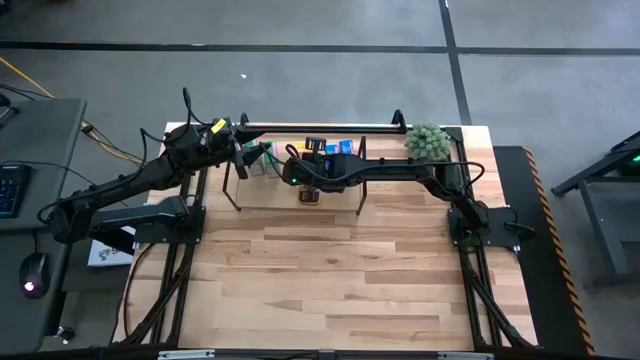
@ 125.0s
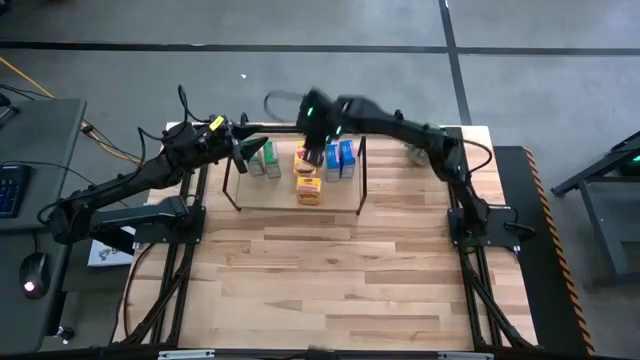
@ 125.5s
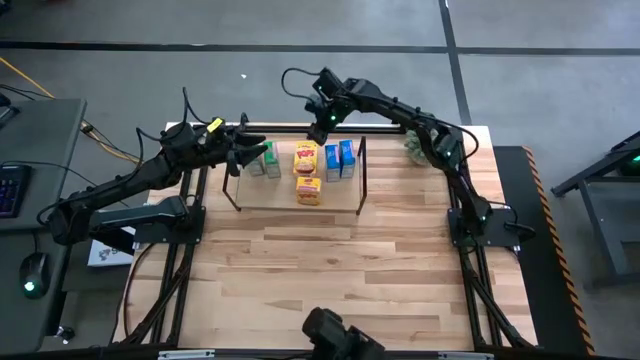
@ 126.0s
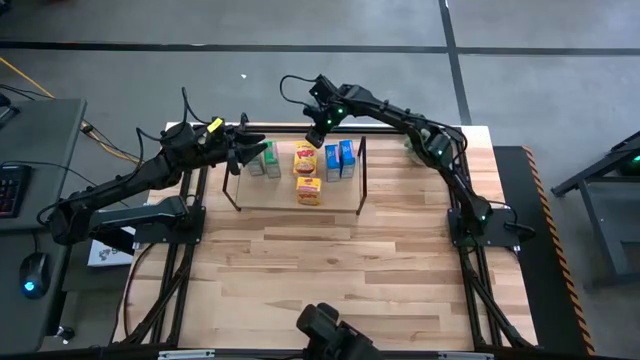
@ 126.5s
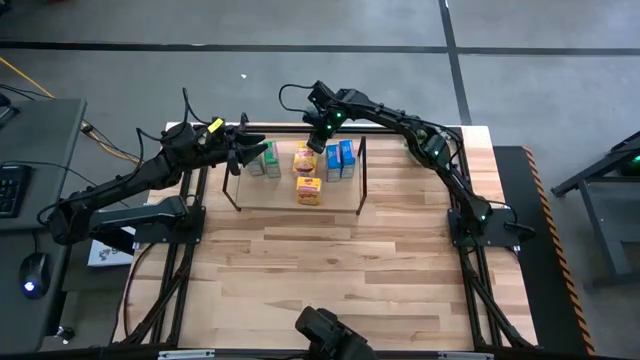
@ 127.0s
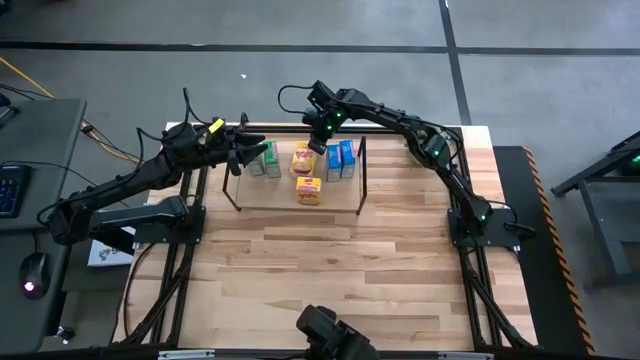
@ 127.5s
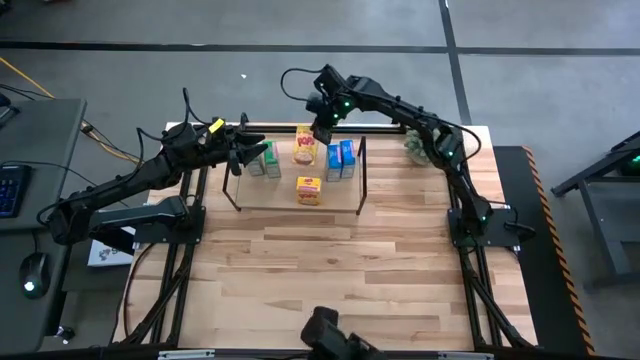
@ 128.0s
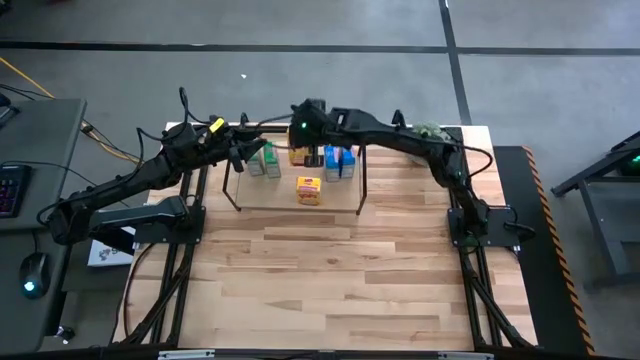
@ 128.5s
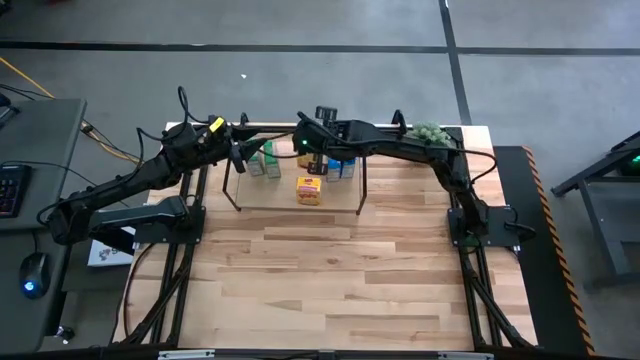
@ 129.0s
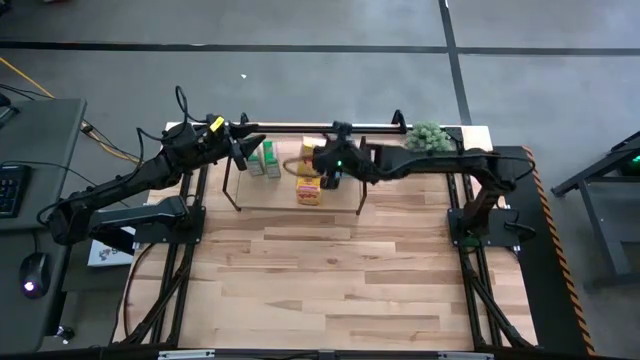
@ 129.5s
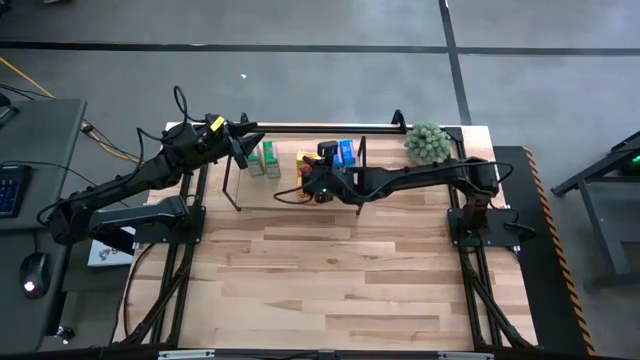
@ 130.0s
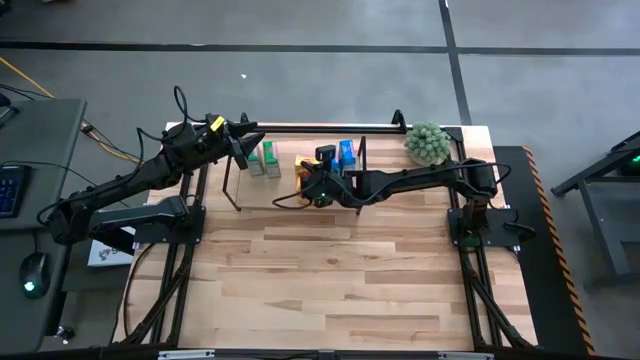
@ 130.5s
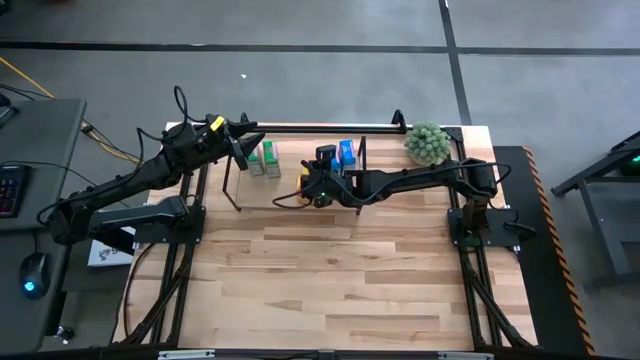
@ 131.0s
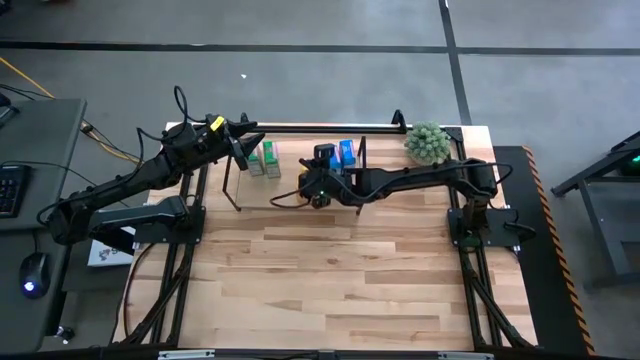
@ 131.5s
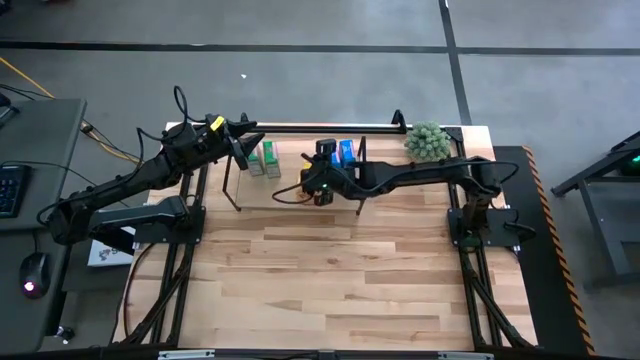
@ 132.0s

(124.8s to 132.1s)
Task: Stack cereal on shelf
Adjust the top yellow cereal box on the shelf

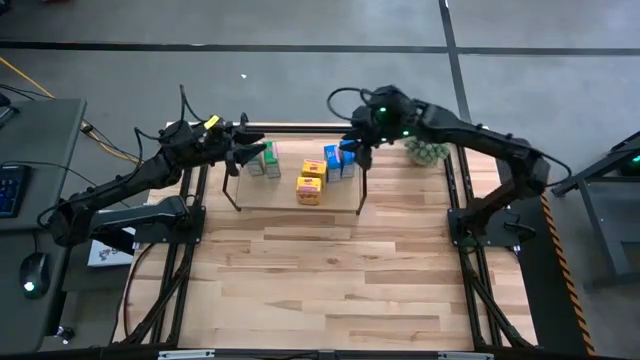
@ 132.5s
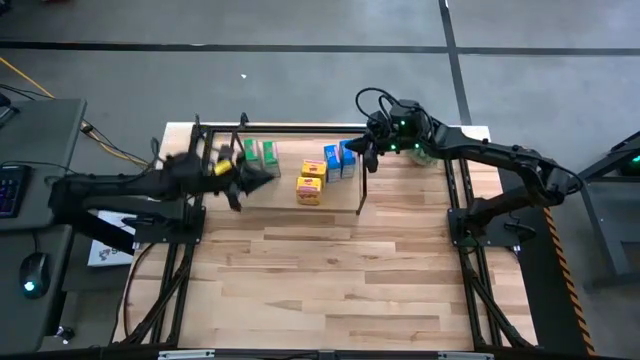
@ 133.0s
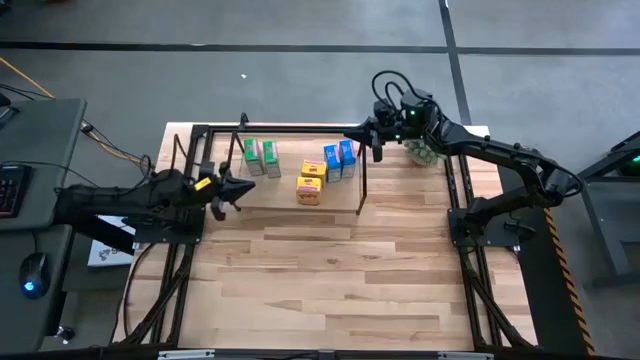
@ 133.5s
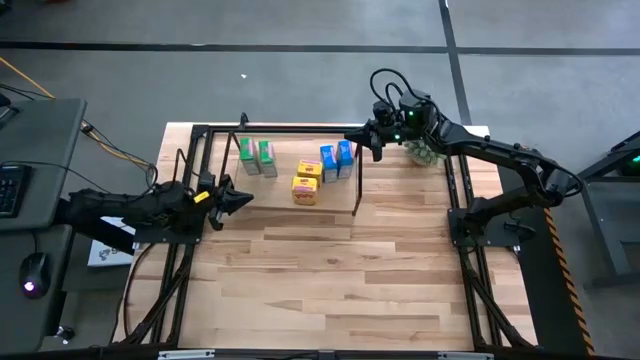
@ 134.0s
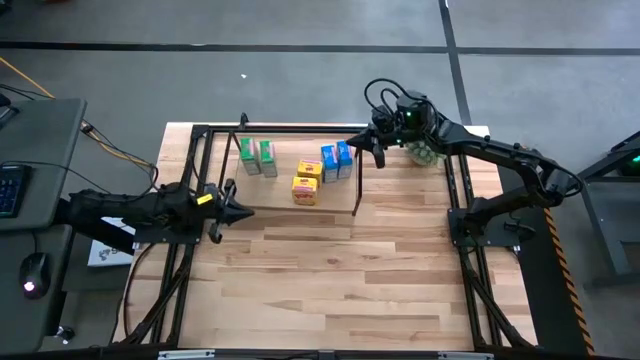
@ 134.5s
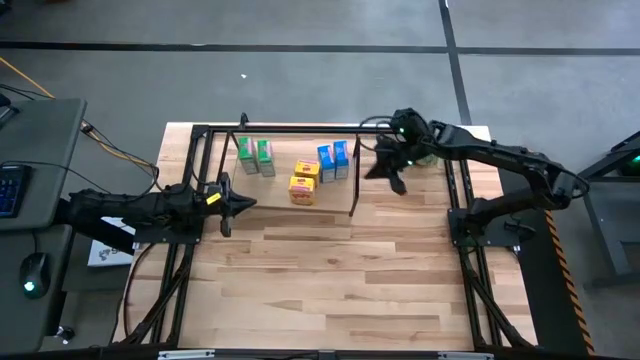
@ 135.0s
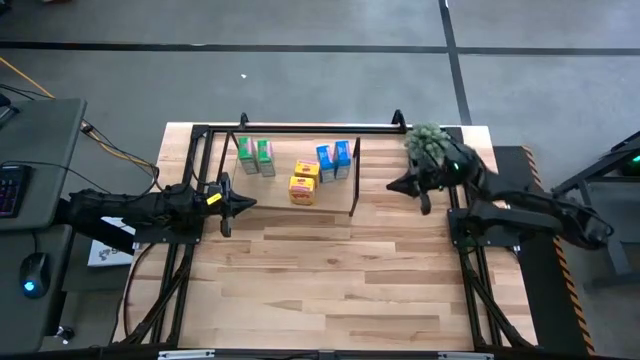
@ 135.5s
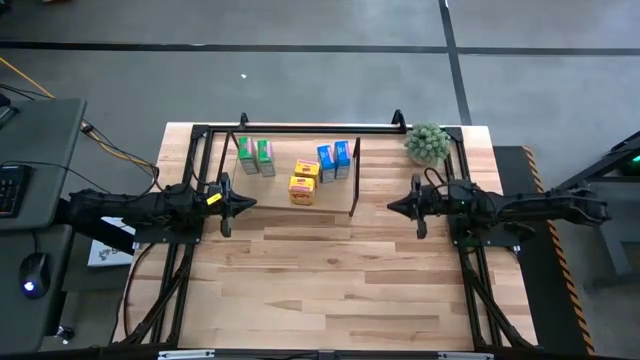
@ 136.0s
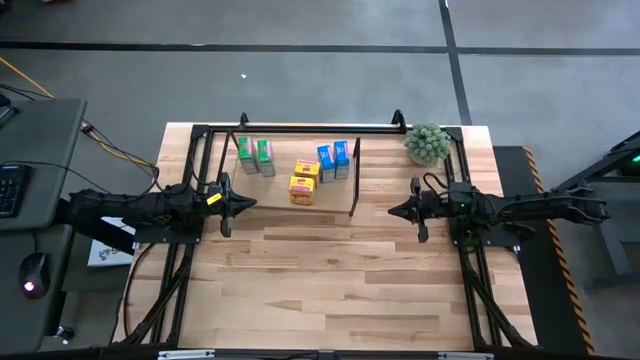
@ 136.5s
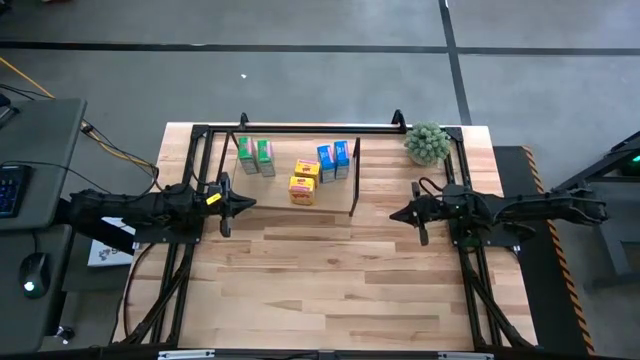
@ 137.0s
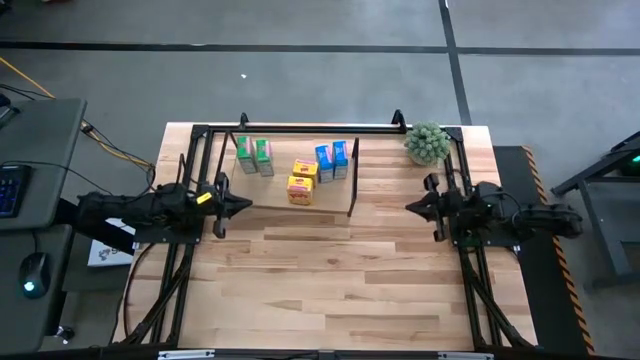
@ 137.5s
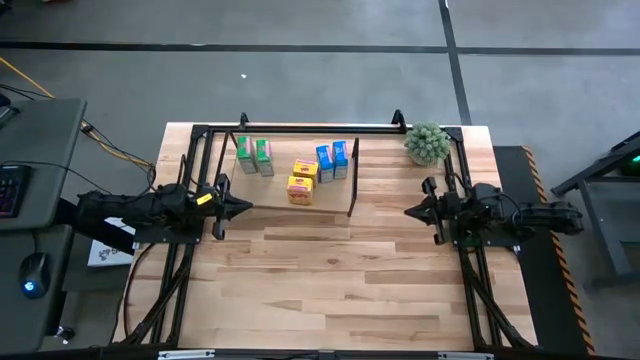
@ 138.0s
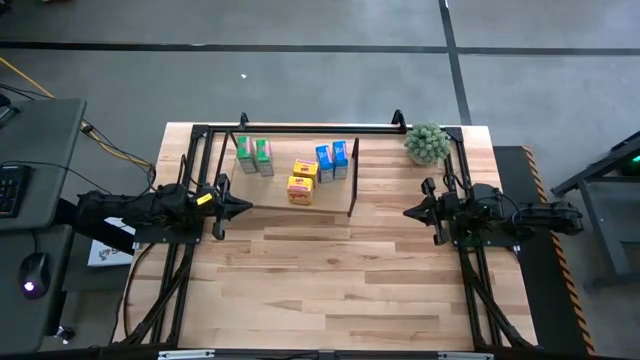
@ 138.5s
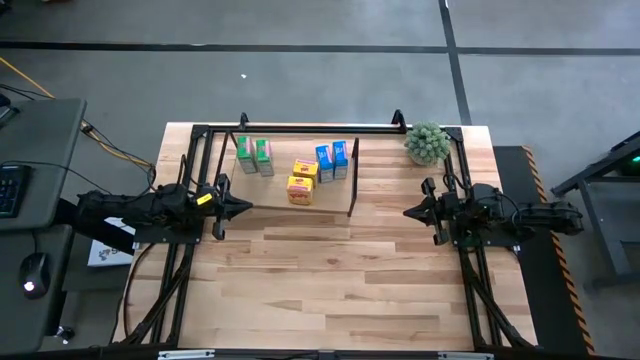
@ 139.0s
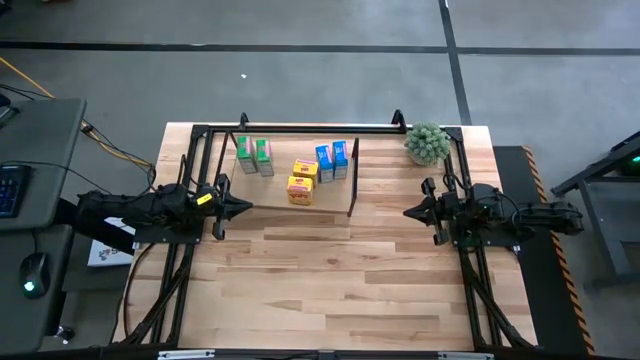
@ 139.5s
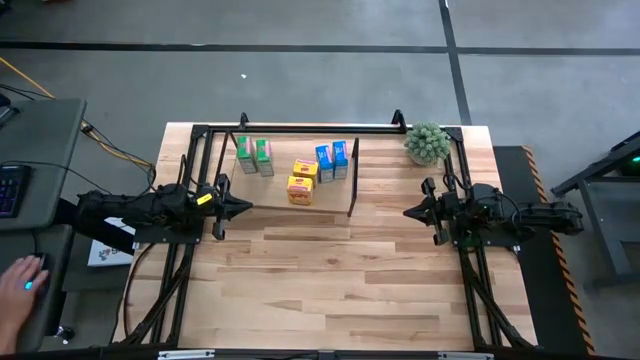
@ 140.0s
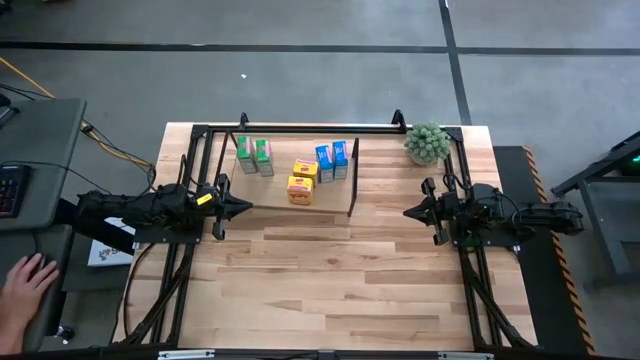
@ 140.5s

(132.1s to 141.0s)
Return to Home Position

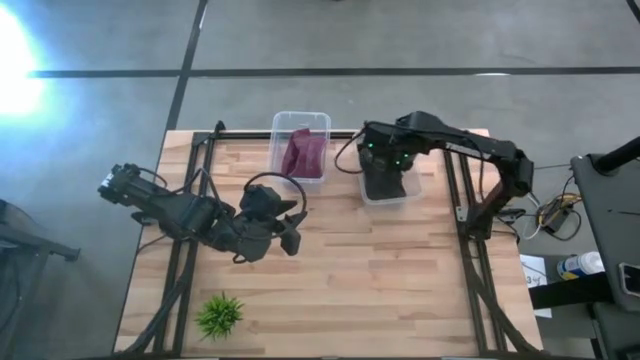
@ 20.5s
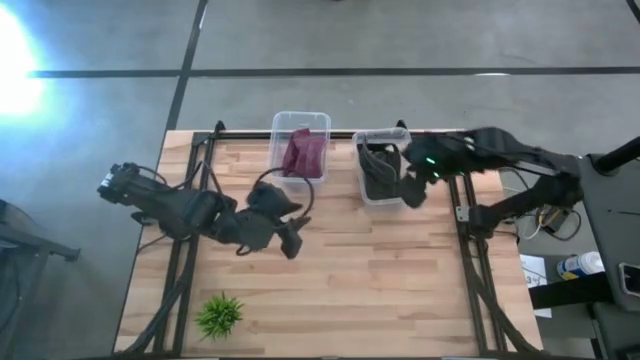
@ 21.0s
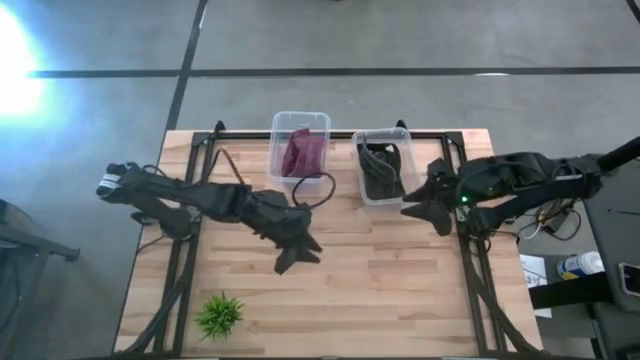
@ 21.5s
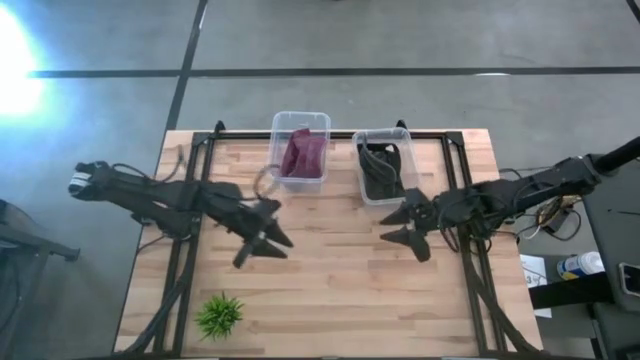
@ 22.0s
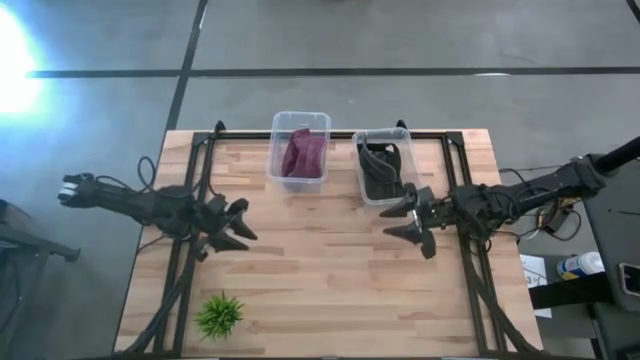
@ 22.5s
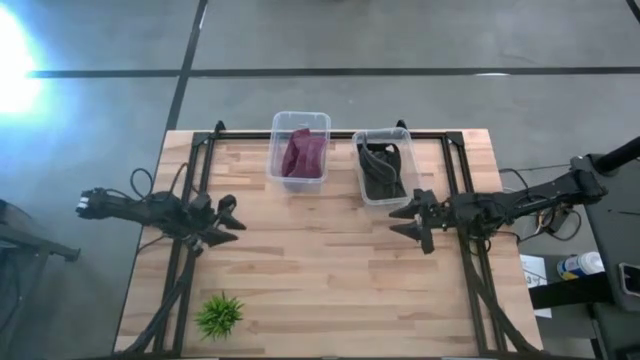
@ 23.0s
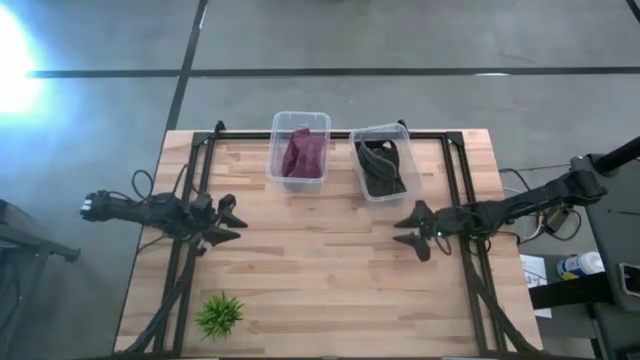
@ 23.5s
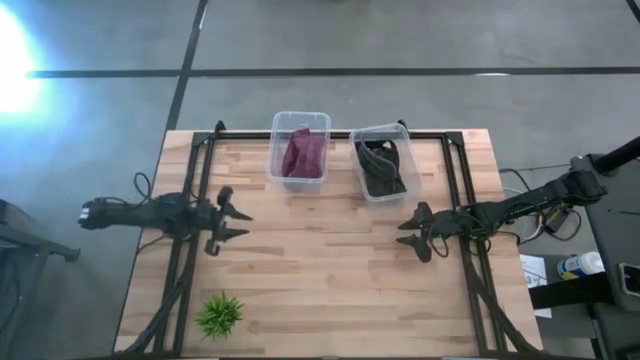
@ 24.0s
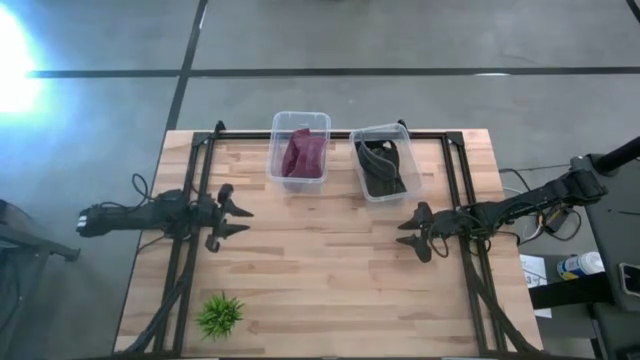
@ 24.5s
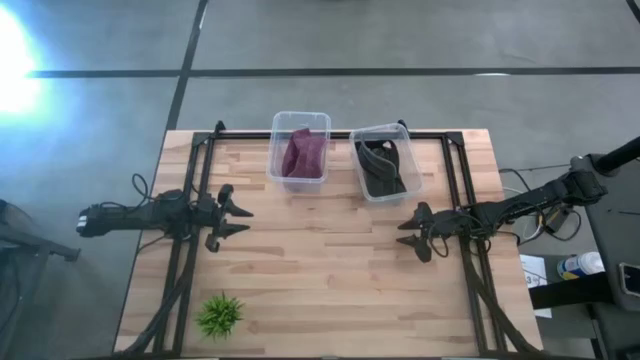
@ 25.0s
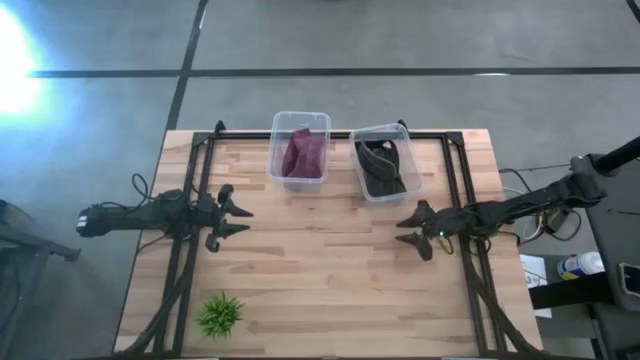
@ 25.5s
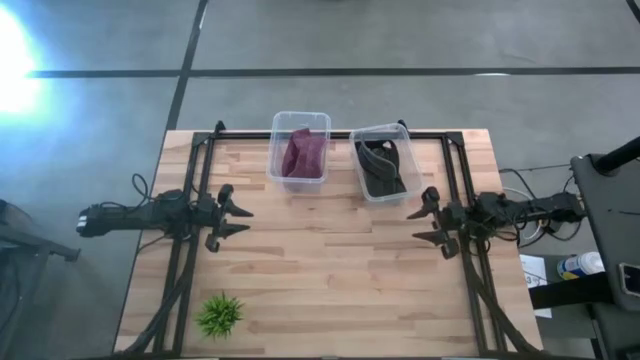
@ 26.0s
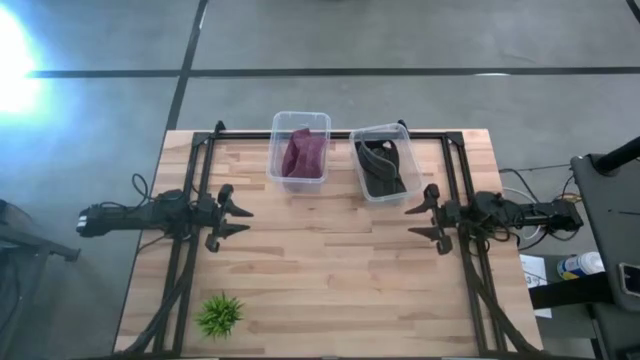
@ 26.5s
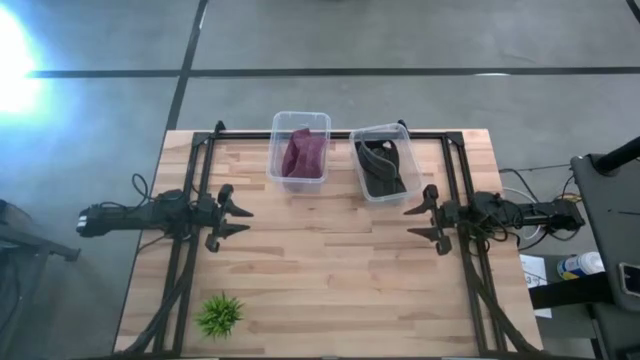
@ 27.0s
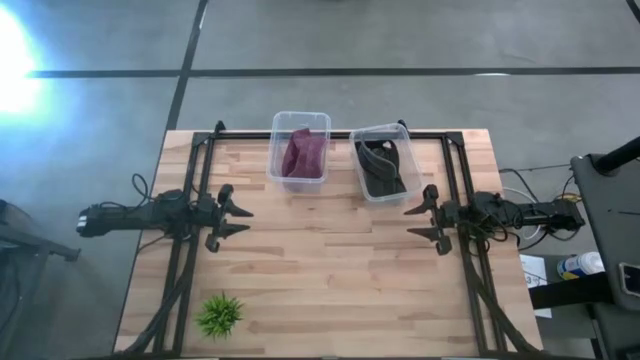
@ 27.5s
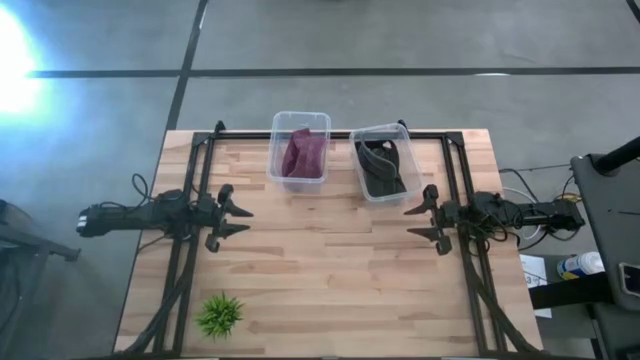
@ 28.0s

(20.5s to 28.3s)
Task: Pick & Place hat
Return to Home Position
